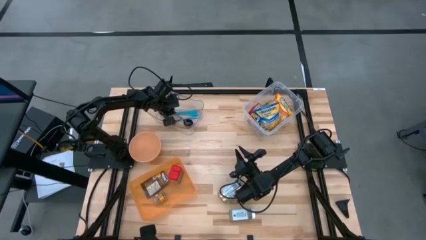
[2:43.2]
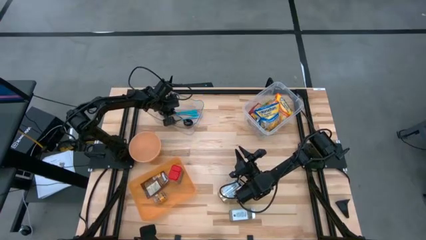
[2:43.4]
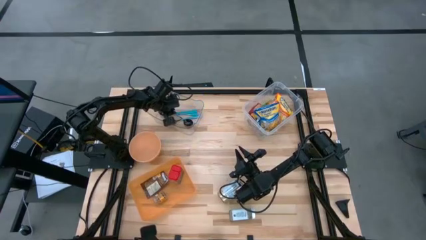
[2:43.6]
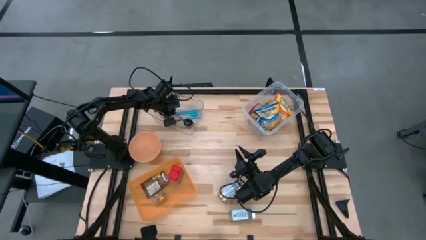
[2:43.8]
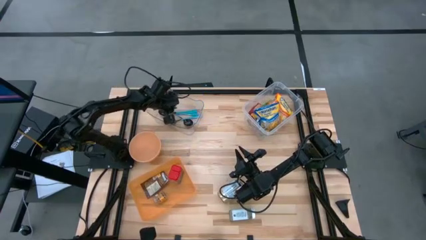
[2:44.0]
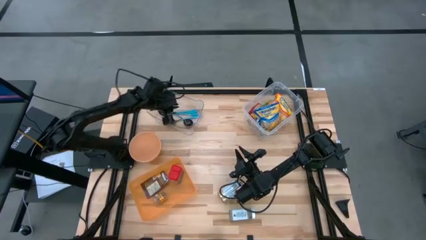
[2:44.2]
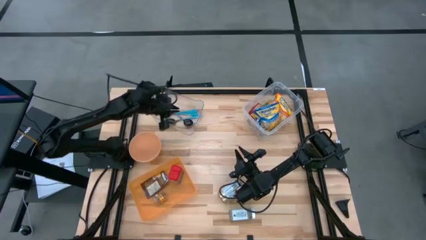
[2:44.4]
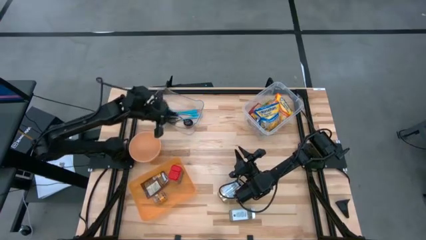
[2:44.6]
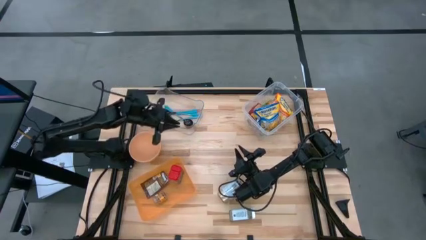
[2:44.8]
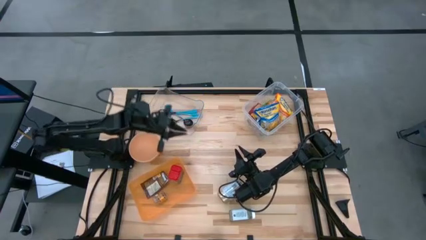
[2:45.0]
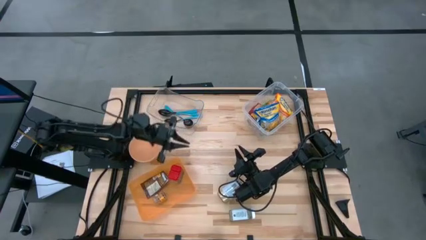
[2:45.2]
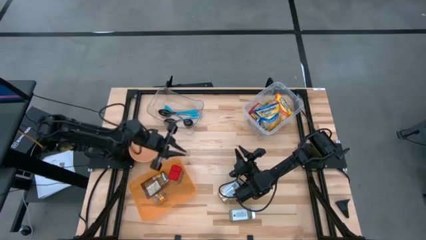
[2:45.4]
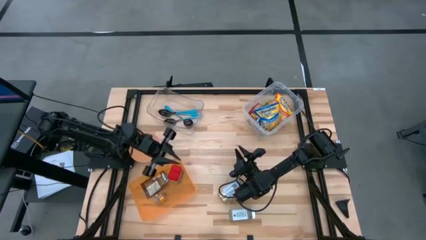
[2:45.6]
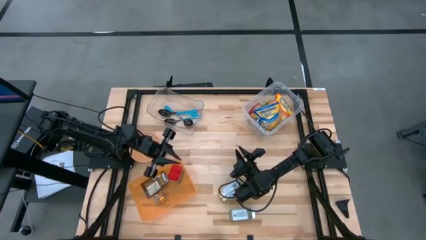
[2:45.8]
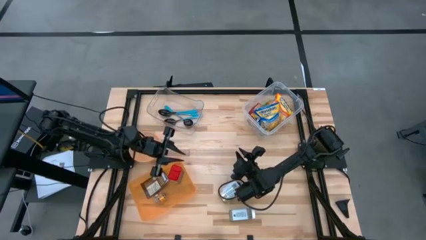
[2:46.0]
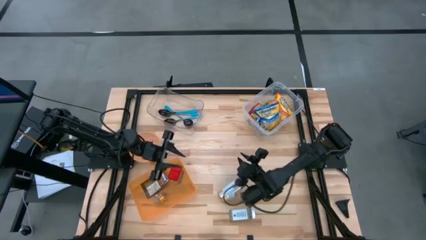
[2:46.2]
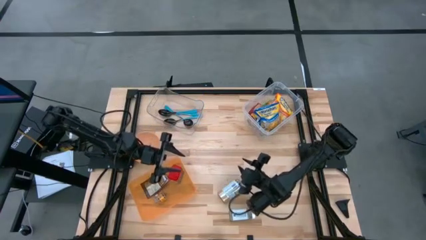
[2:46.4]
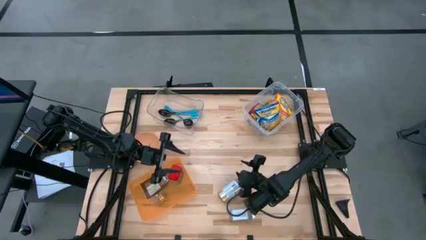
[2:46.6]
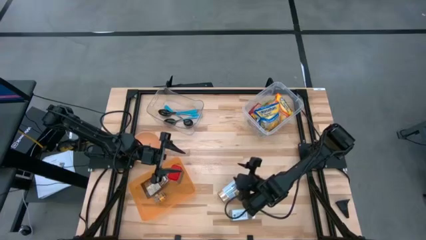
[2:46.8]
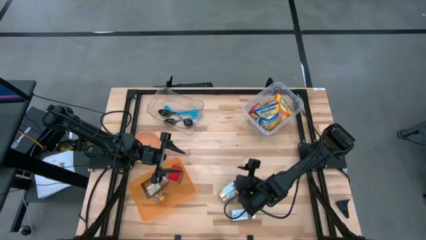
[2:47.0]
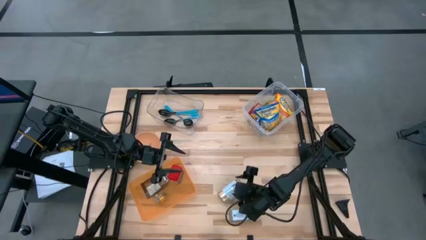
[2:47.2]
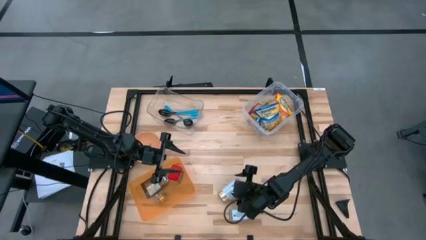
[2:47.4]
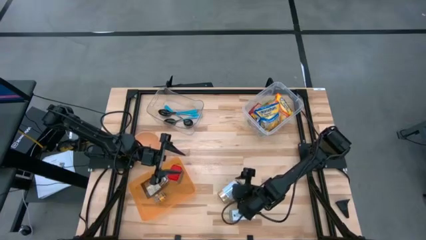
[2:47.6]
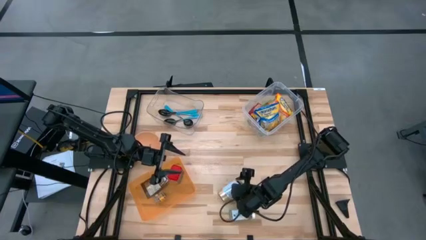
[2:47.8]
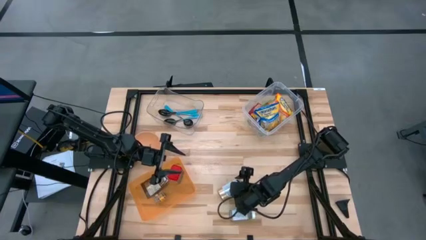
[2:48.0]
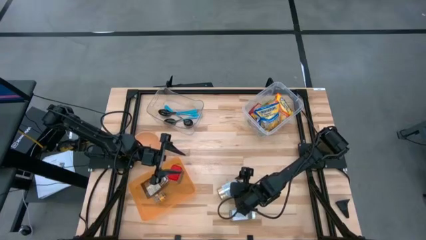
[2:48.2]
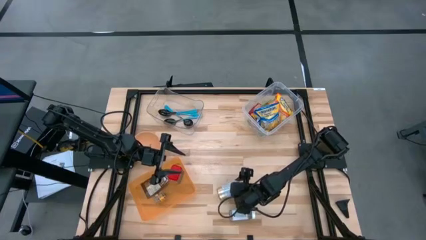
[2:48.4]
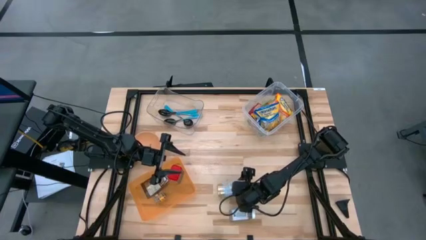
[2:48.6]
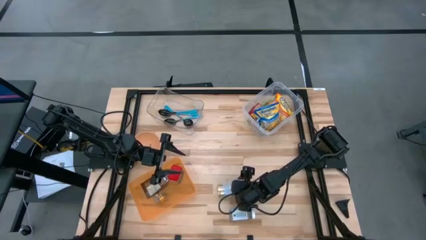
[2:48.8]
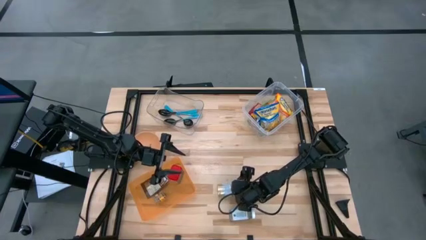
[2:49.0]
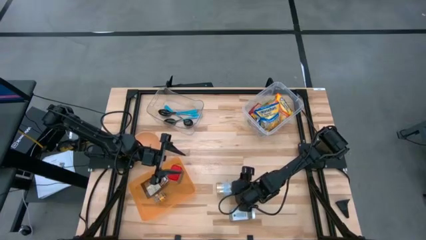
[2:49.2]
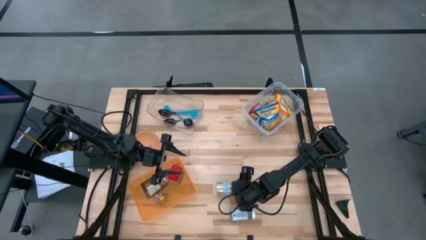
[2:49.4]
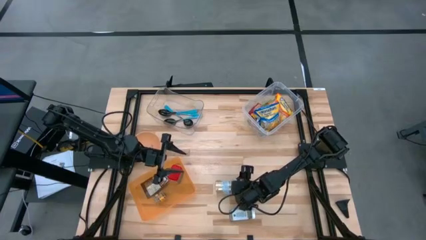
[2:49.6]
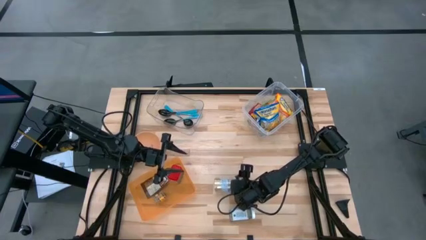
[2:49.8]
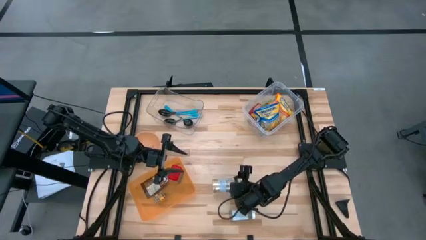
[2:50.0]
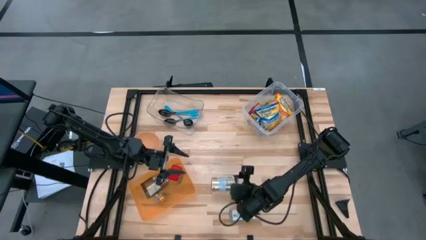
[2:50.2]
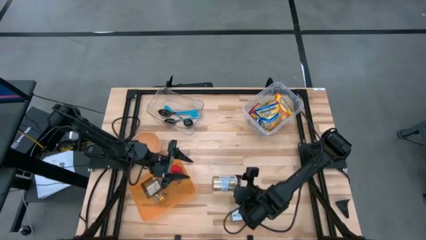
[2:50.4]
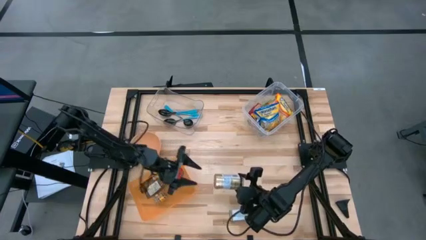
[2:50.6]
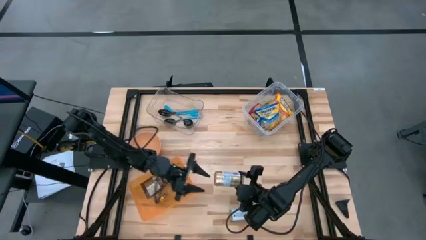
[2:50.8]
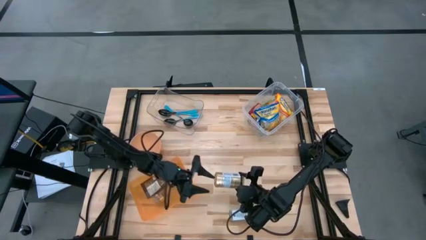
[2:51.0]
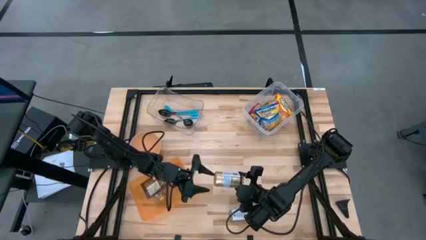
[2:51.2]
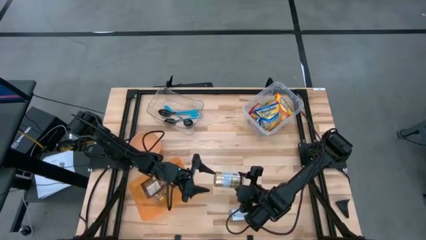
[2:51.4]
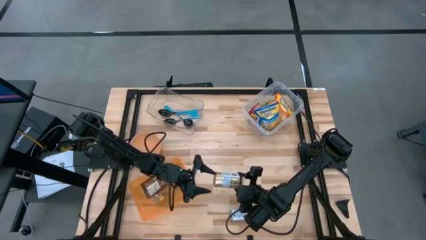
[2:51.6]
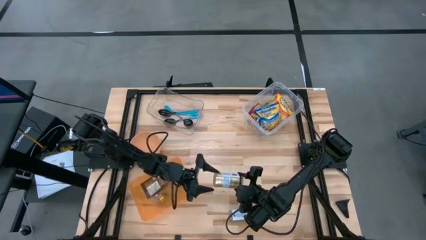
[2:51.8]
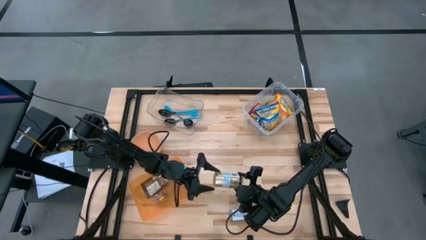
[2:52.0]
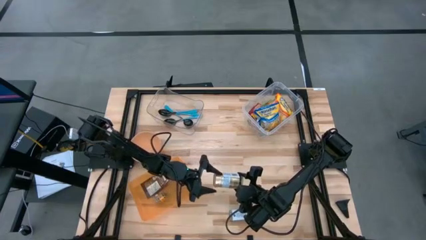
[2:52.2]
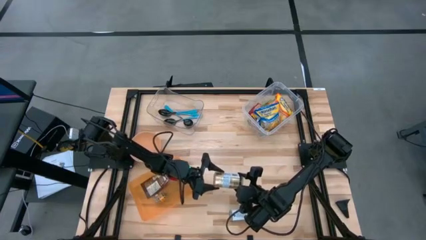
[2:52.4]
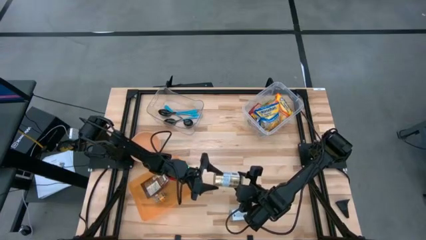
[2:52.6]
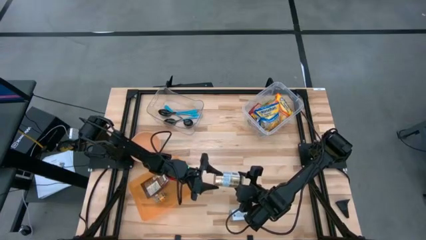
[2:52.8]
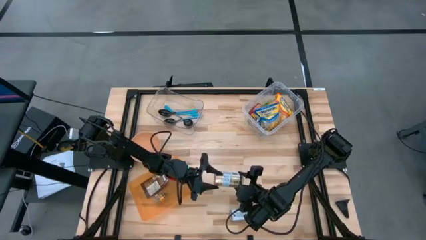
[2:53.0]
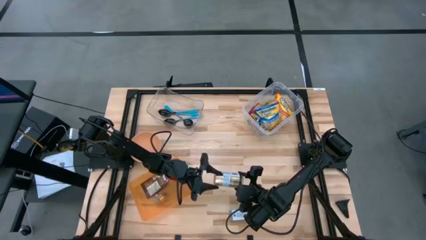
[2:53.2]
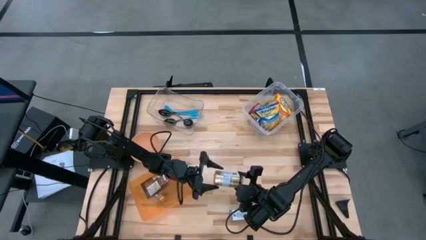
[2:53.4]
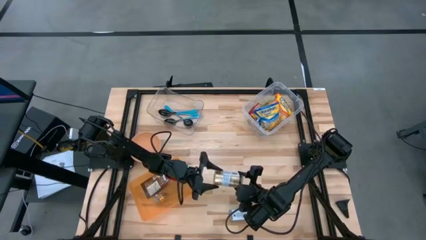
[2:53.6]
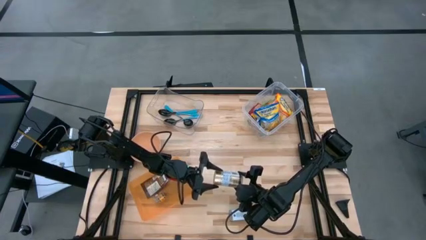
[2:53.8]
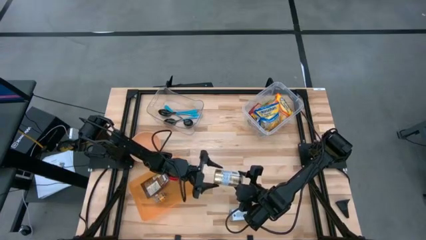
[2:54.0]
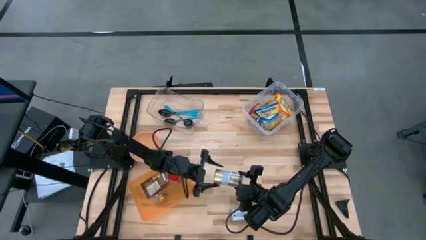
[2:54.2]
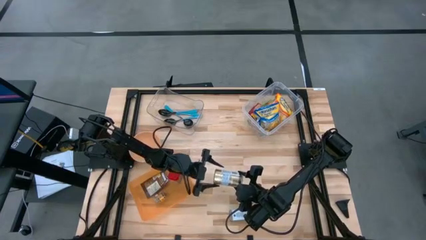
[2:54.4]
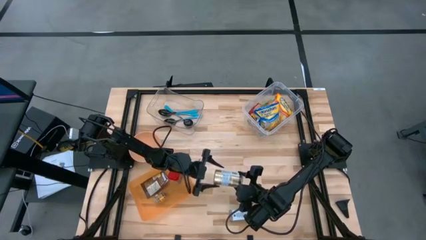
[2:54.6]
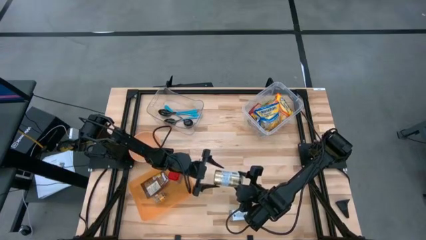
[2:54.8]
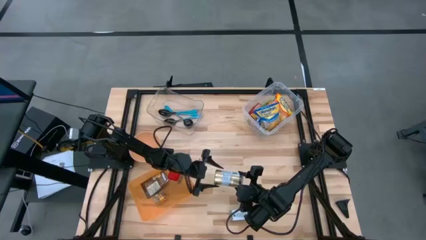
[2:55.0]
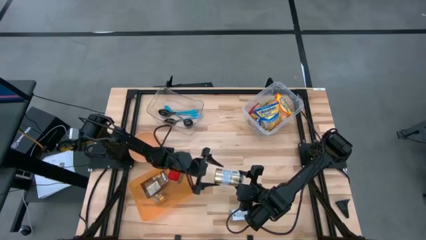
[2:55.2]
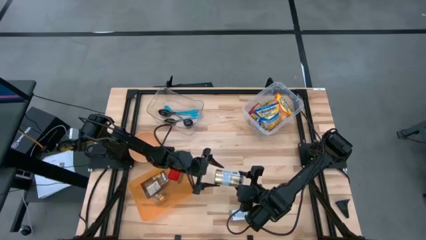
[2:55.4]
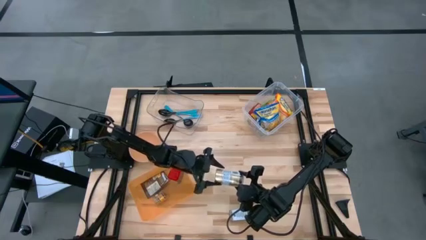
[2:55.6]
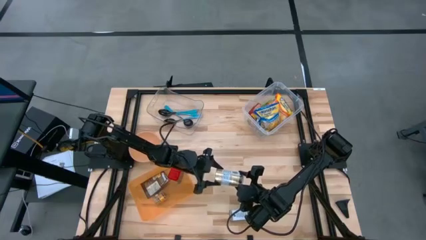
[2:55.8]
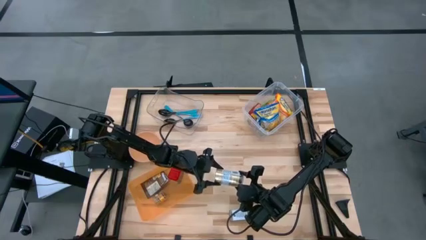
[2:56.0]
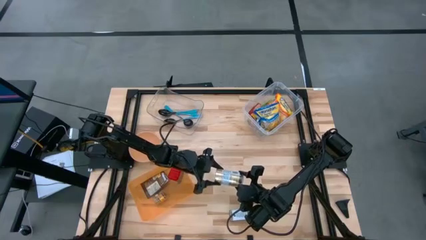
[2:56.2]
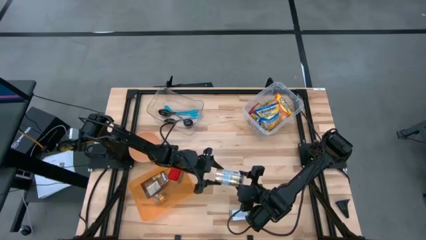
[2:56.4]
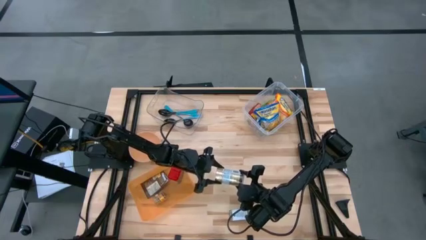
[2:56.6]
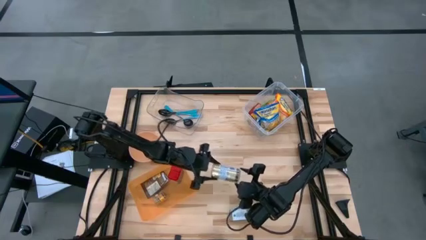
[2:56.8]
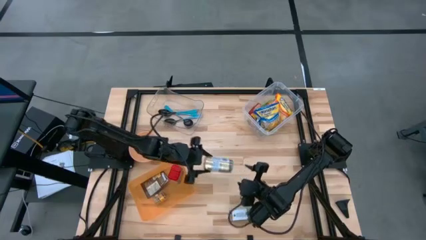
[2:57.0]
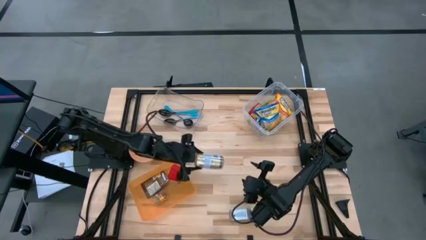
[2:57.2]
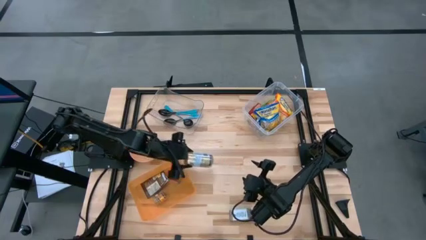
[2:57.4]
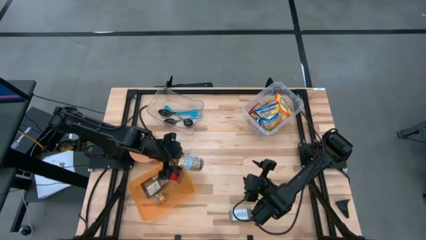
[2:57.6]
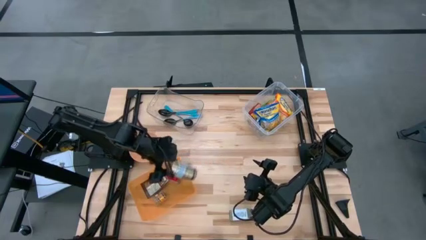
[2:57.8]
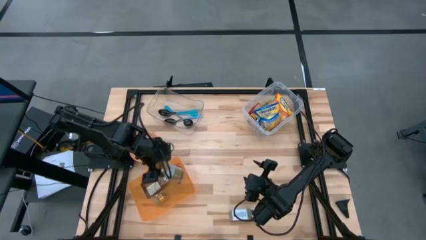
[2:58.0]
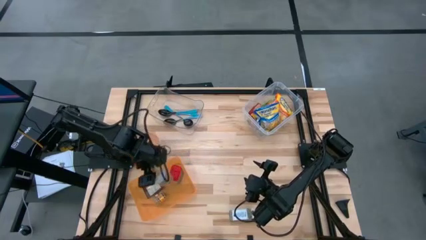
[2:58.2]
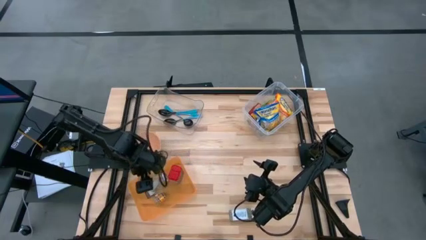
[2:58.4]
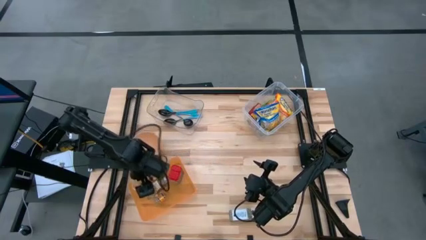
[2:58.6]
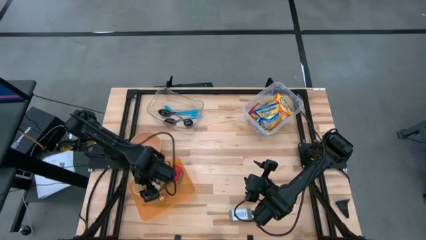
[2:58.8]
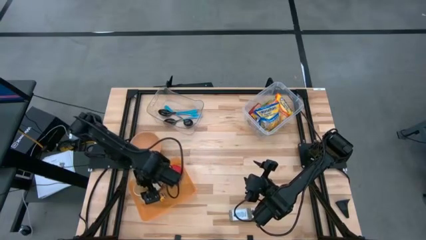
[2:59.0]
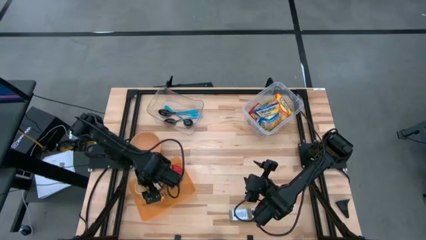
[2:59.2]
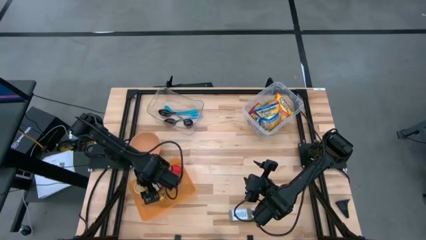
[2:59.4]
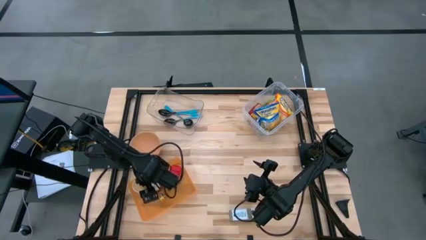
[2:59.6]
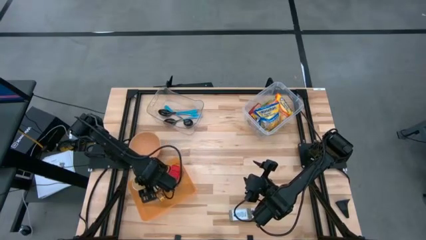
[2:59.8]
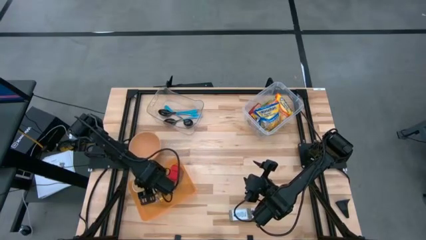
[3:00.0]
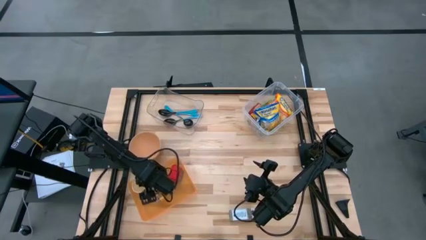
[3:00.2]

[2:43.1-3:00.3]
Task: Pick & Place Food Item
Put the gold seasoning bottle into the orange bin
